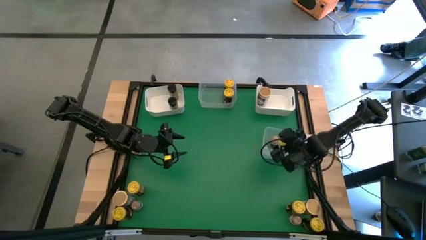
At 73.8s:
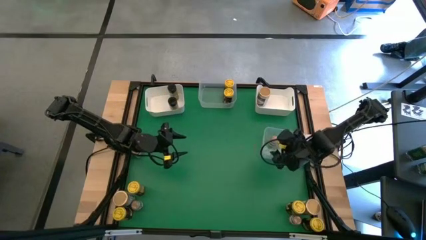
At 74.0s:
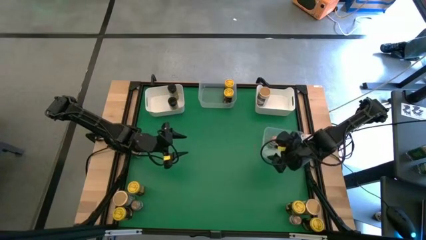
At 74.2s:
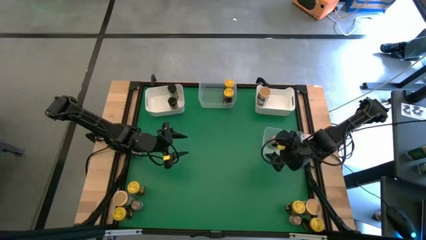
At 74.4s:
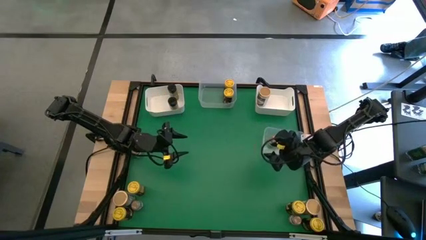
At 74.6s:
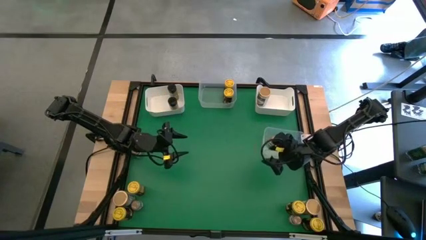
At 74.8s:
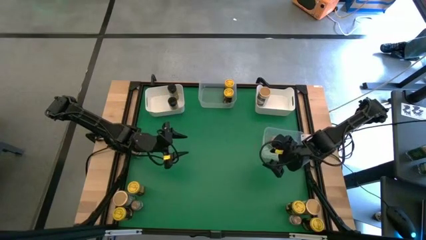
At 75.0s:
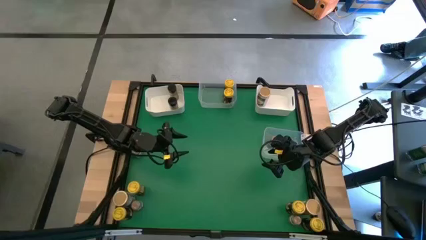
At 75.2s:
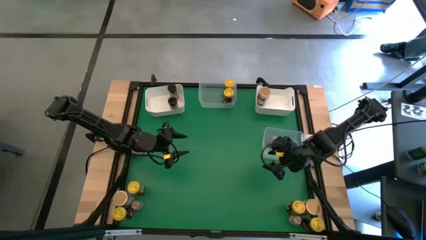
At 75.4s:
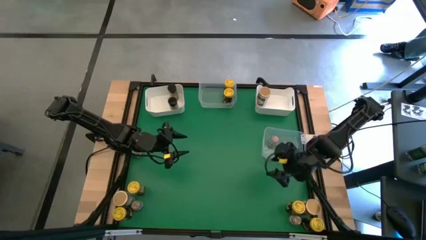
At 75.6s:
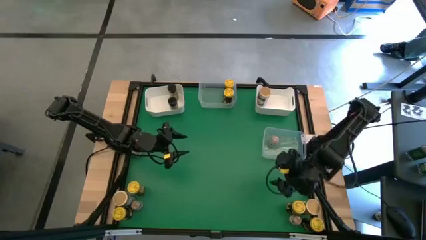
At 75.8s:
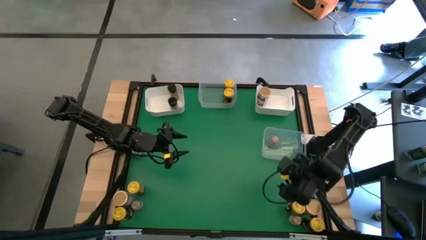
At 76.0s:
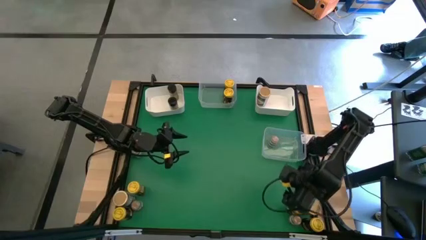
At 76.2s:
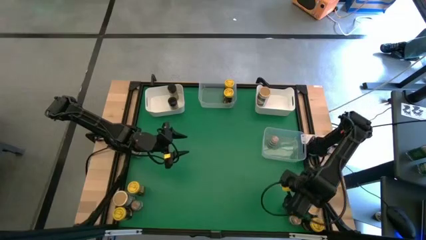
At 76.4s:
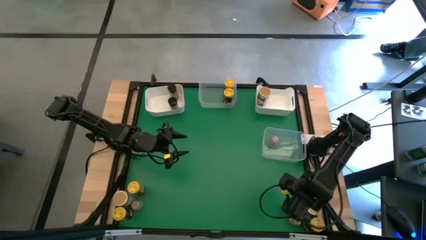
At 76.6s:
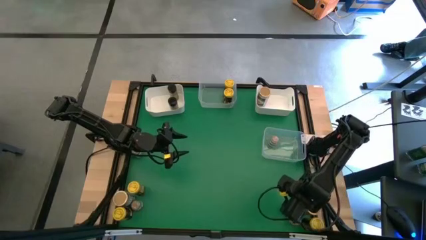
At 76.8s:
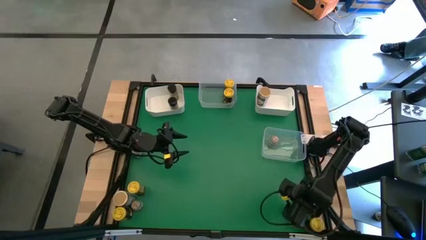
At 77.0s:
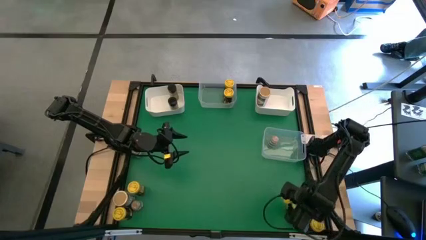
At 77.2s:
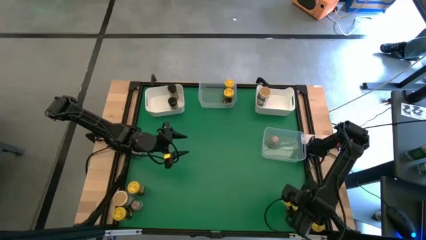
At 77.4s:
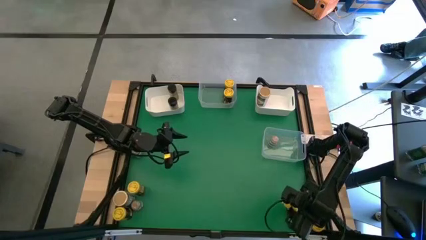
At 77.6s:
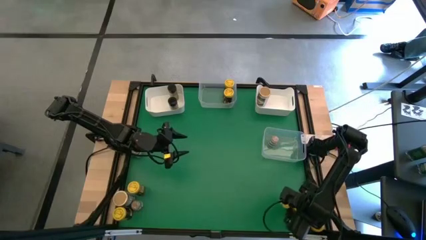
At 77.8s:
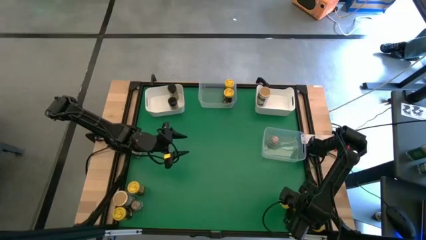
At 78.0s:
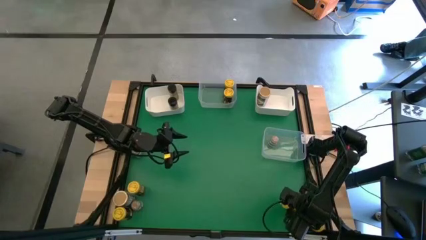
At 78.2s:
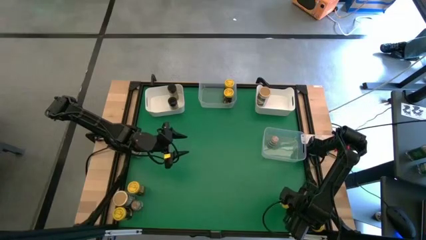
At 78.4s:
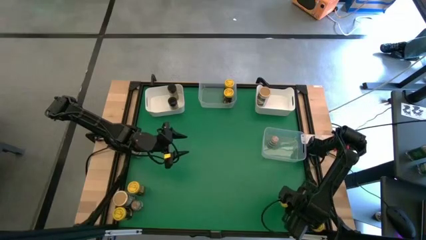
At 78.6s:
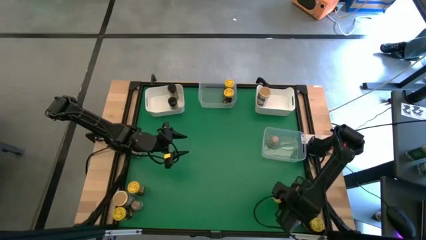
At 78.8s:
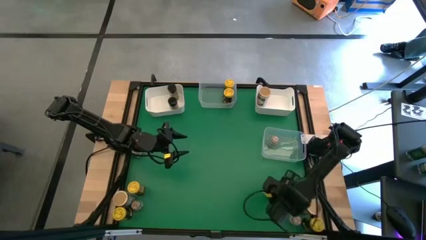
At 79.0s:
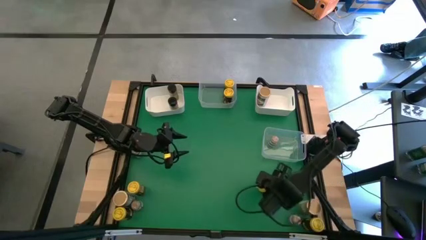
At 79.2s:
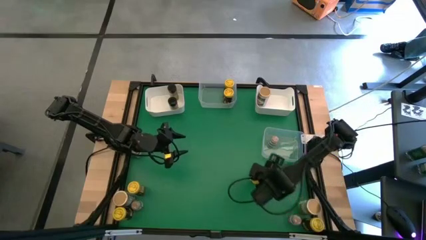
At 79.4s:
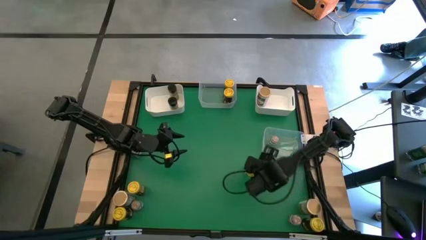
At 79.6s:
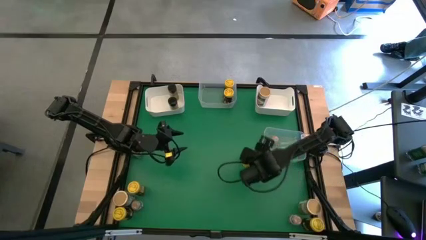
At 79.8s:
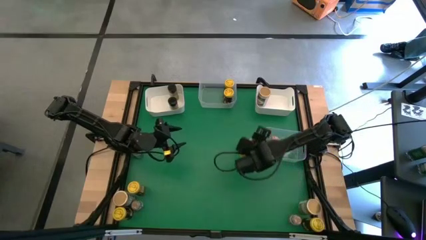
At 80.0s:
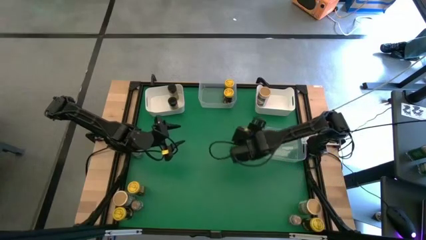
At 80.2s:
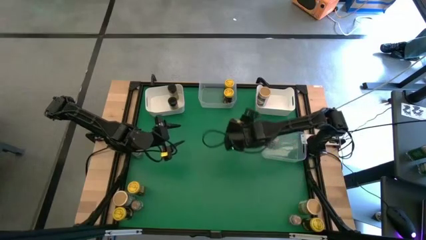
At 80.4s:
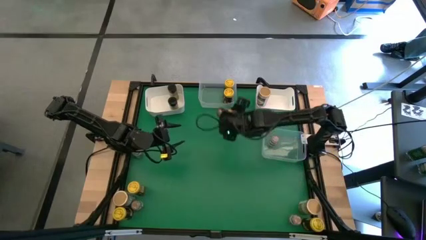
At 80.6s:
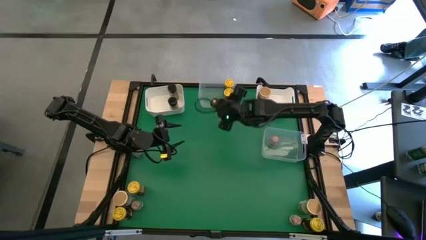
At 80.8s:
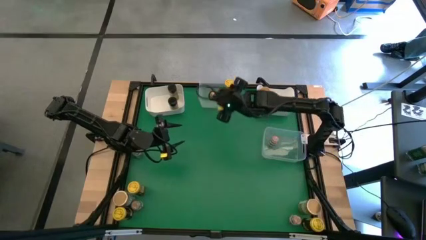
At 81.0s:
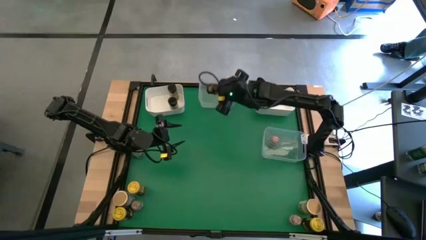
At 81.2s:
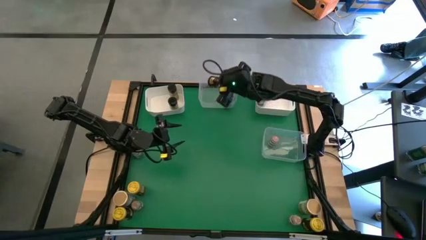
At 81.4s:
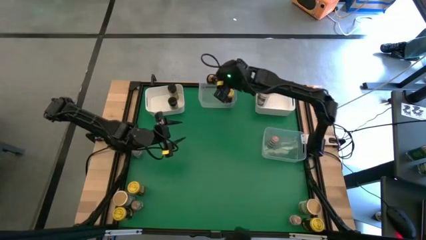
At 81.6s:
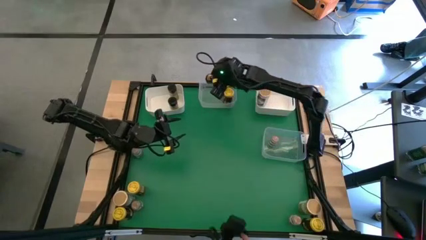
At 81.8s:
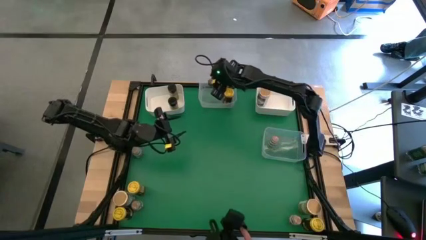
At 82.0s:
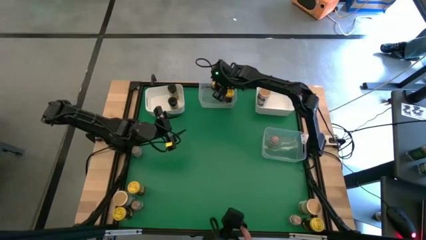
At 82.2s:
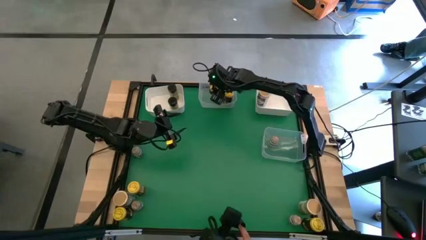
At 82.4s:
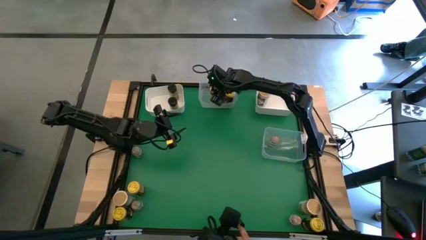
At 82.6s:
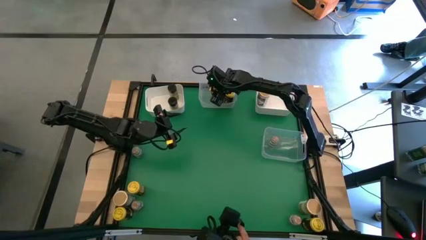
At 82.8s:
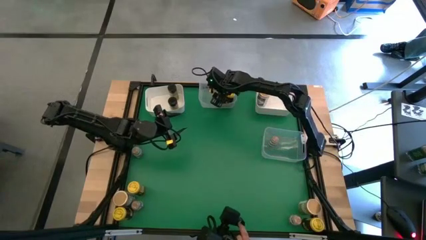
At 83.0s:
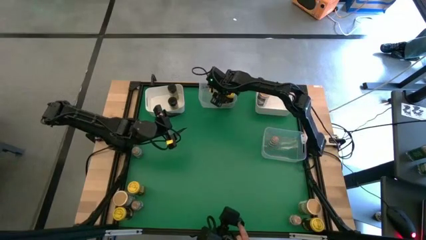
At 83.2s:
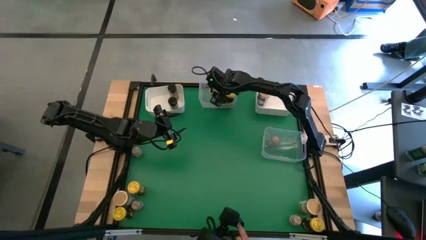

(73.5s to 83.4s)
Task: Sort spices by type
Put the yellow seasoning bottle into the top transparent bin

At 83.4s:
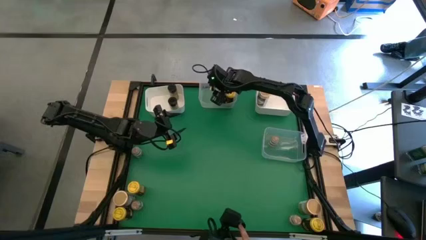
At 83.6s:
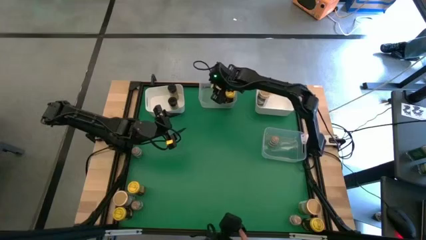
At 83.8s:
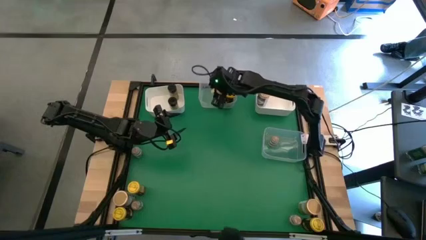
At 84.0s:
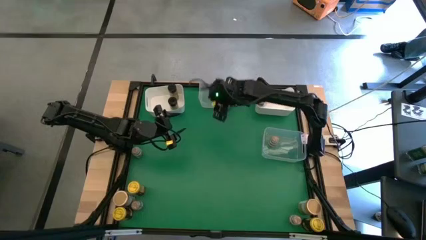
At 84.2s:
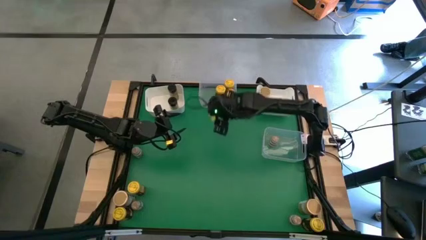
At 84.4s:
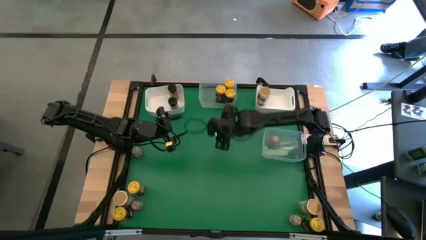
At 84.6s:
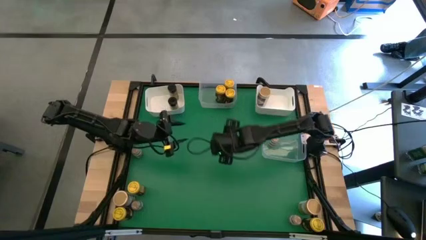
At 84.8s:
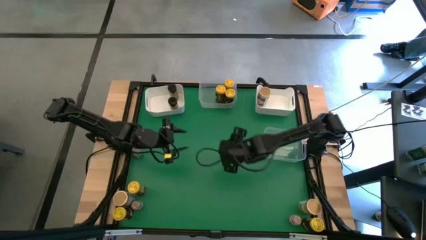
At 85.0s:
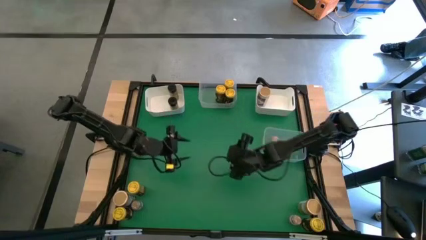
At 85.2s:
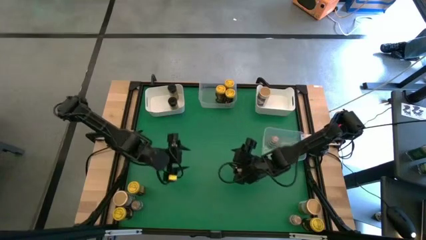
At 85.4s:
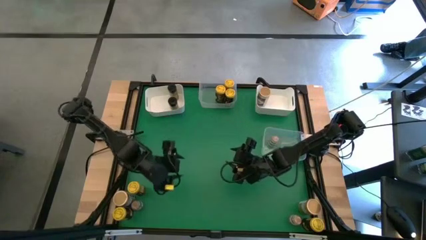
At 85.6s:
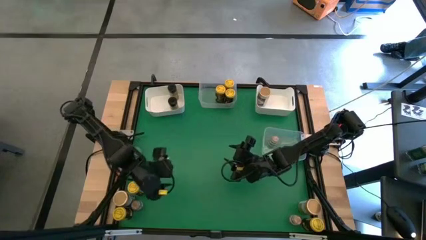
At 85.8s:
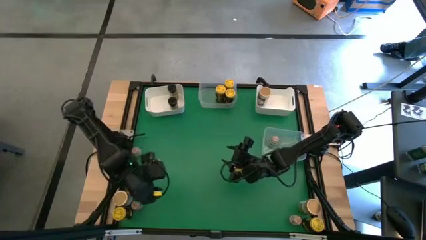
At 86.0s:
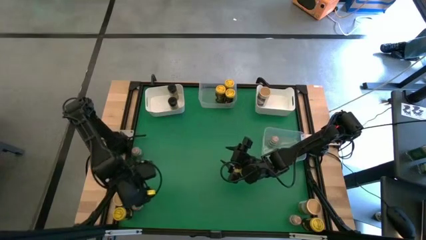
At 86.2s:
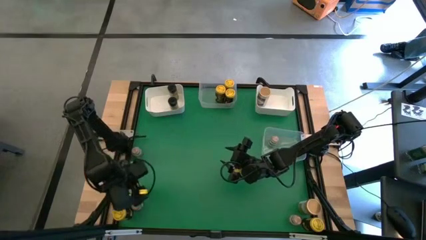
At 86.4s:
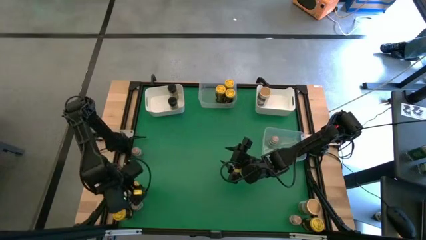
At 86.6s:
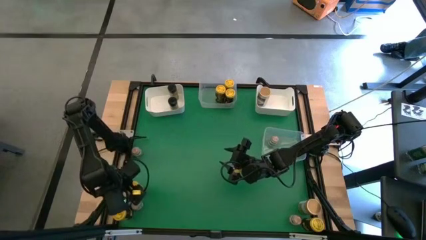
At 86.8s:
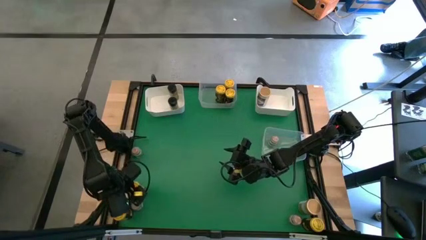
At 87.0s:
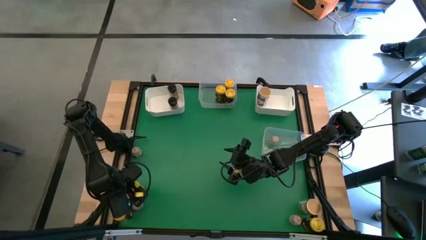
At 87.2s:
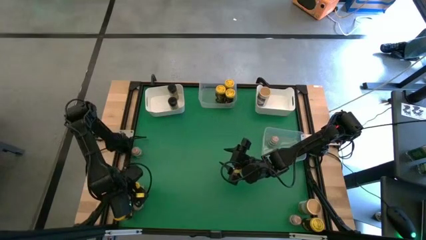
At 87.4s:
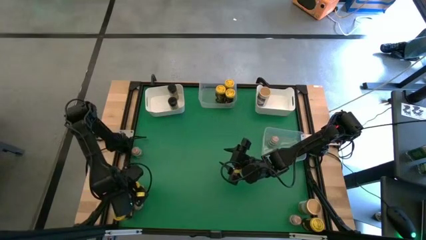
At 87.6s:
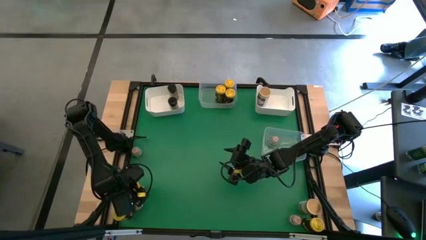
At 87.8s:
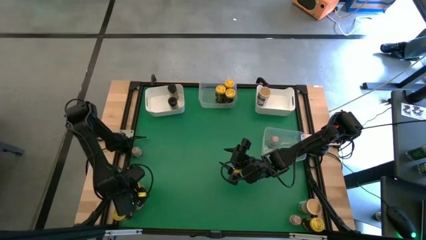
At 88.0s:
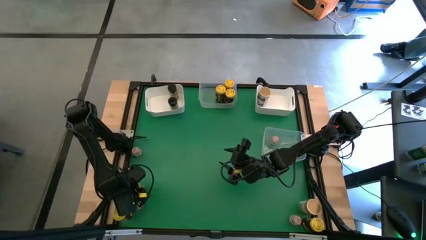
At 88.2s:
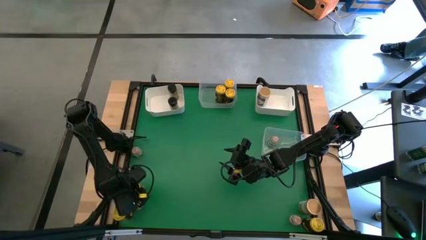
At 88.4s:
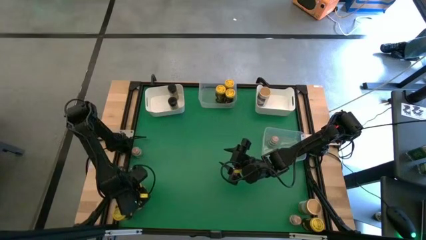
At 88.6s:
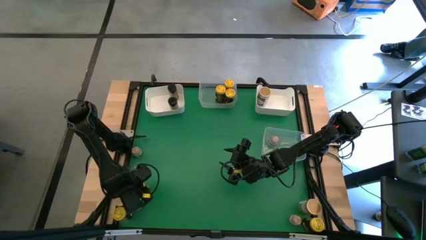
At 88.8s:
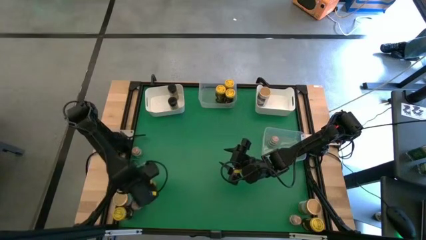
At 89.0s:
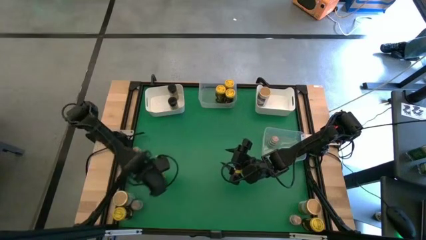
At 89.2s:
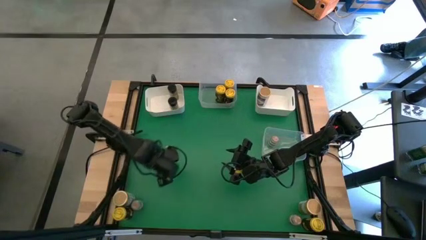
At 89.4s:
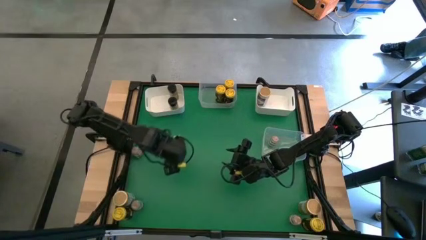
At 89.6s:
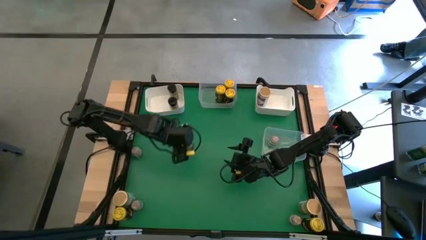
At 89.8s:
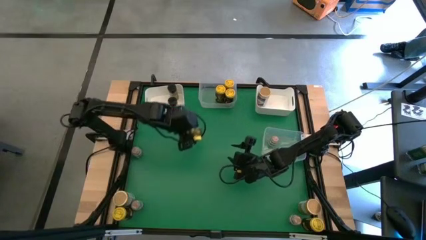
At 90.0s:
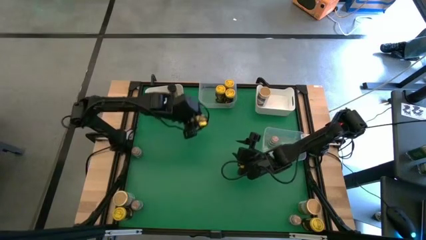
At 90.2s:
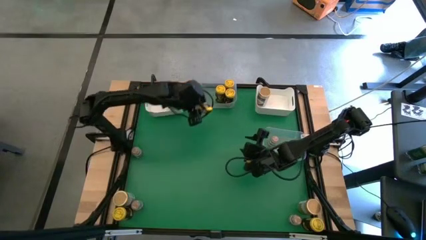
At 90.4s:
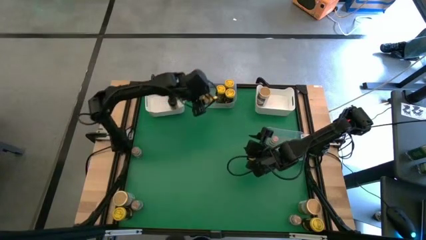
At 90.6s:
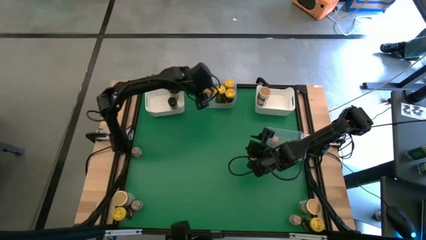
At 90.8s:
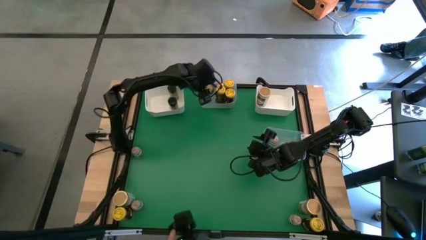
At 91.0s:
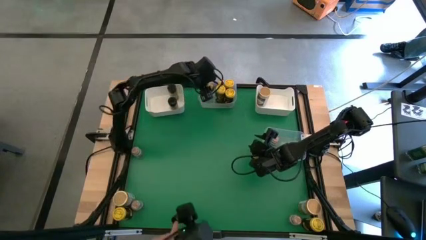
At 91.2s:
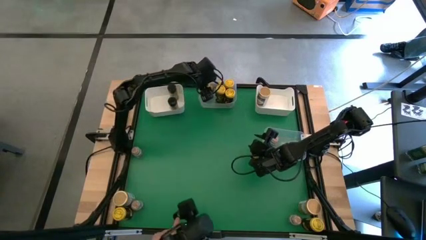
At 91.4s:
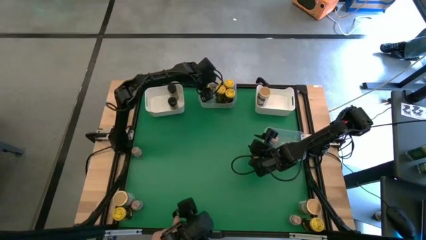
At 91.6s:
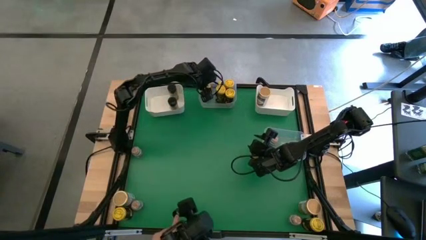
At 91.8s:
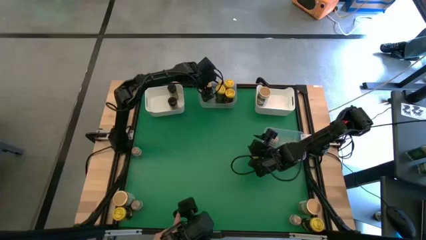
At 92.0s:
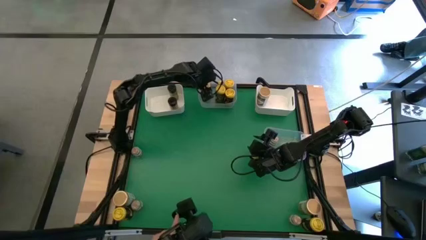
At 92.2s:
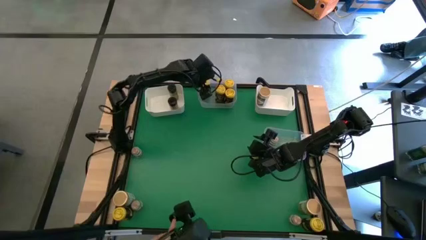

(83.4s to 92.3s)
Put the yellow seasoning bottle into the top transparent bin
